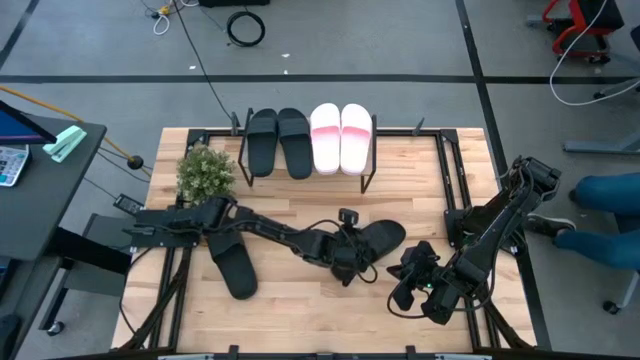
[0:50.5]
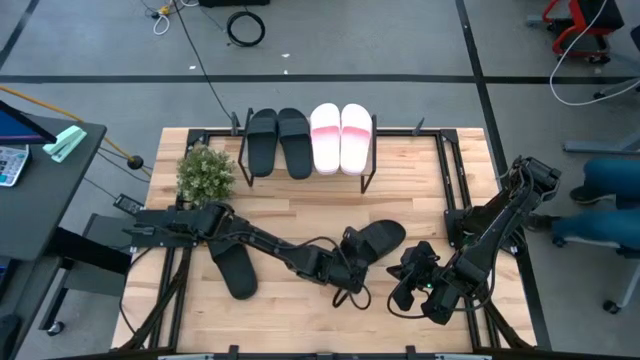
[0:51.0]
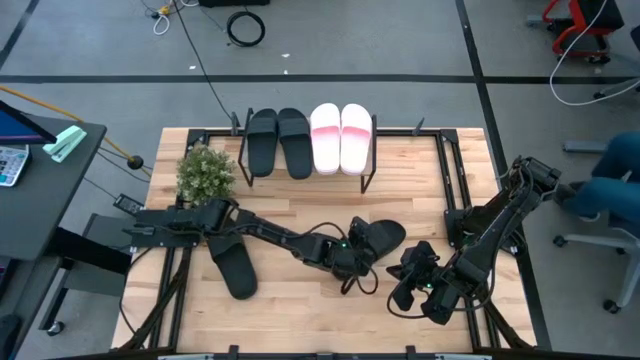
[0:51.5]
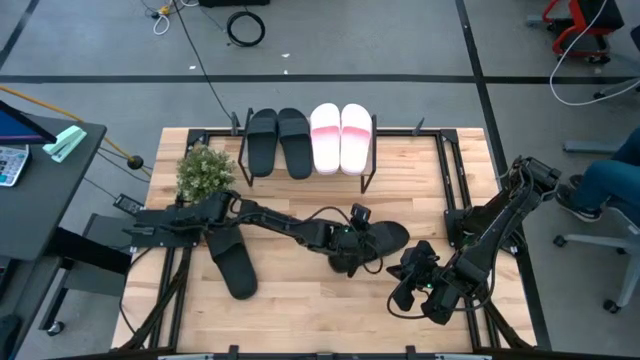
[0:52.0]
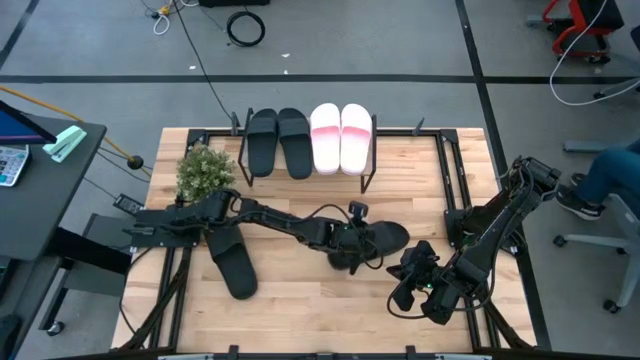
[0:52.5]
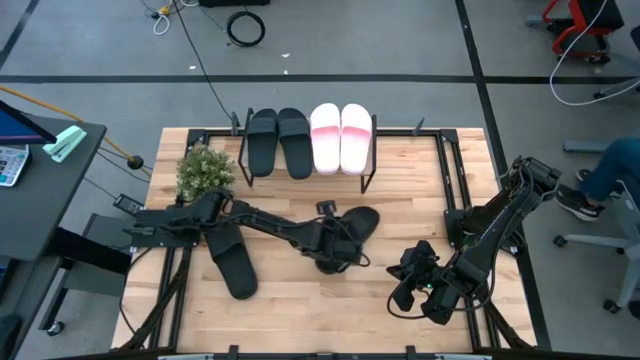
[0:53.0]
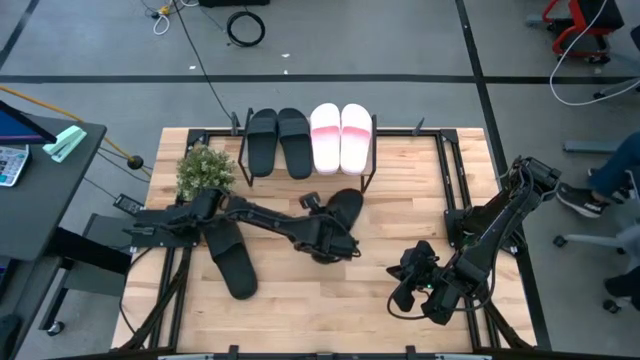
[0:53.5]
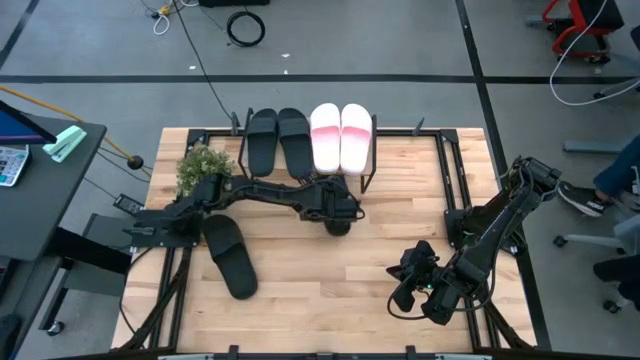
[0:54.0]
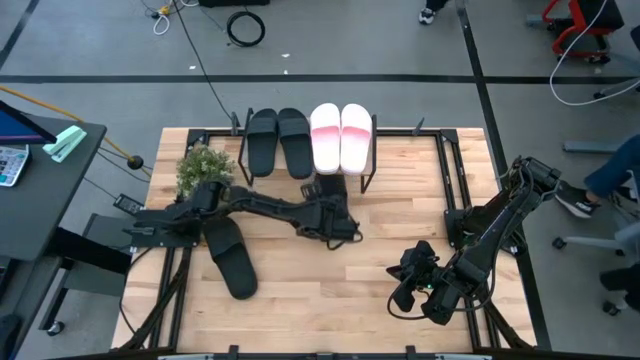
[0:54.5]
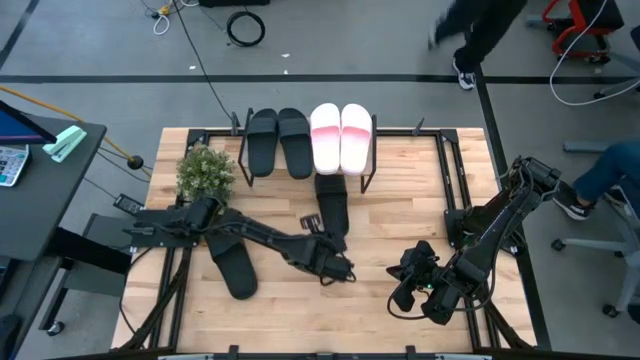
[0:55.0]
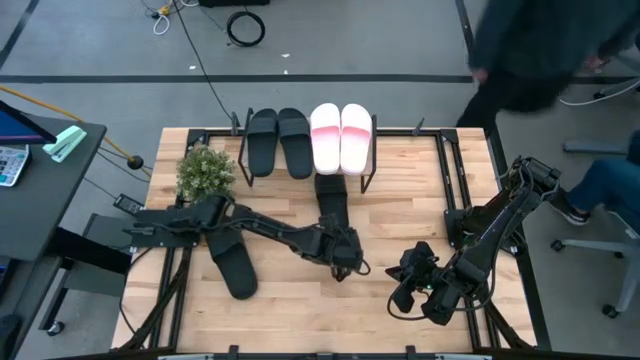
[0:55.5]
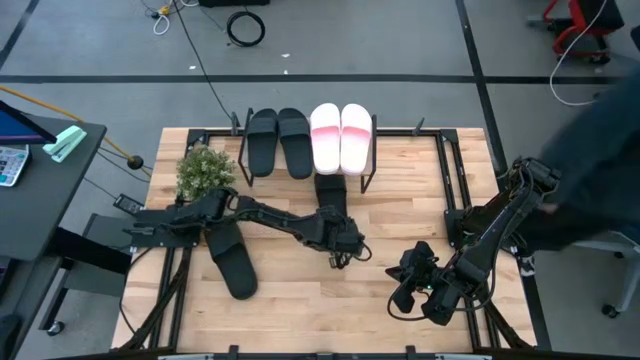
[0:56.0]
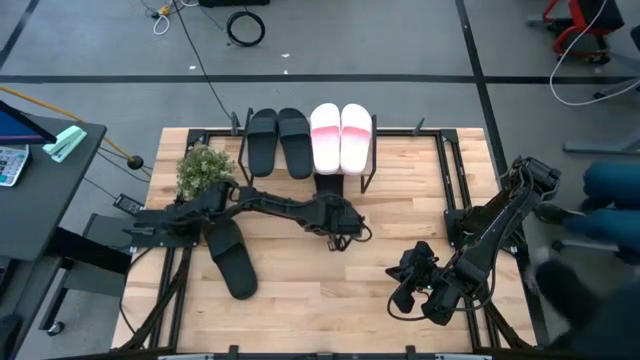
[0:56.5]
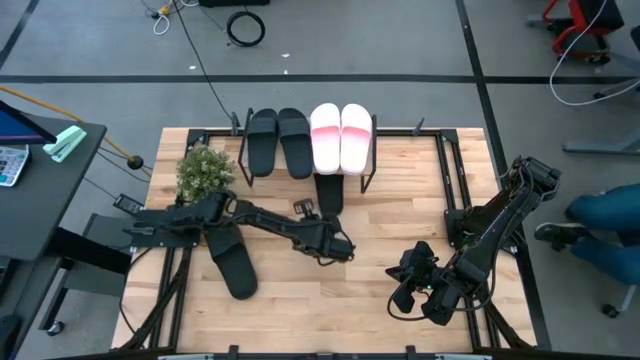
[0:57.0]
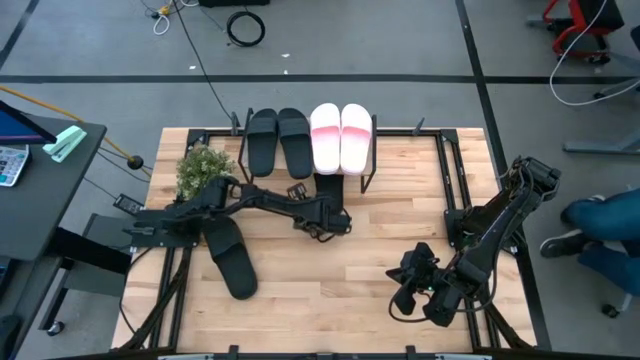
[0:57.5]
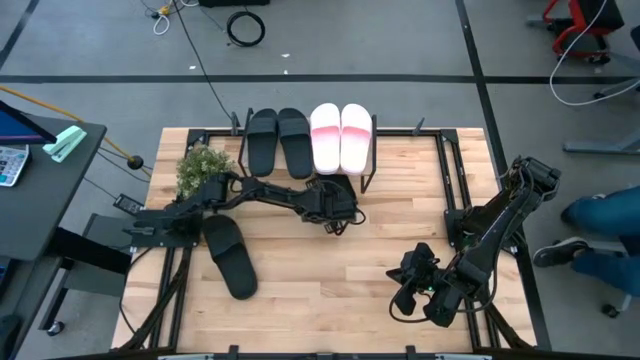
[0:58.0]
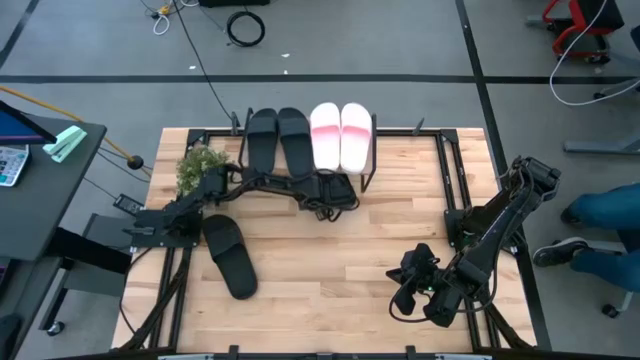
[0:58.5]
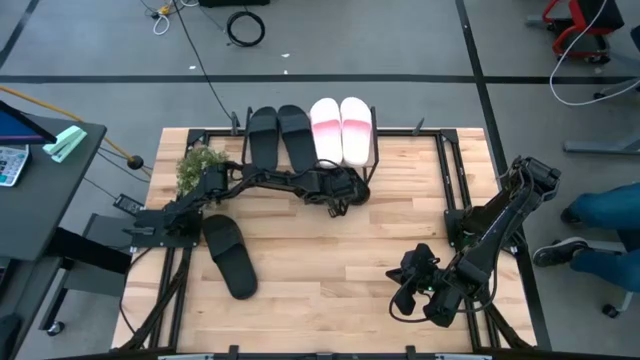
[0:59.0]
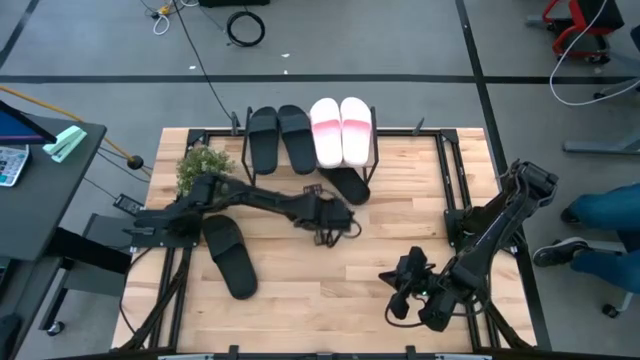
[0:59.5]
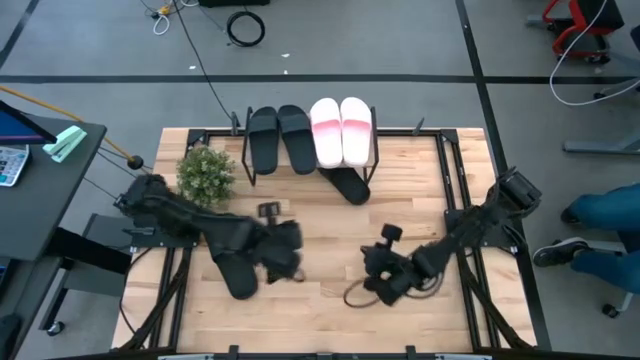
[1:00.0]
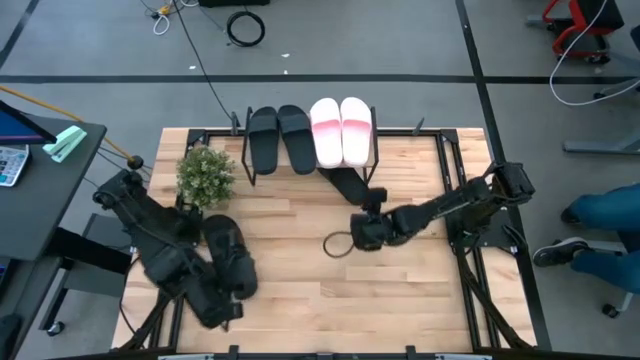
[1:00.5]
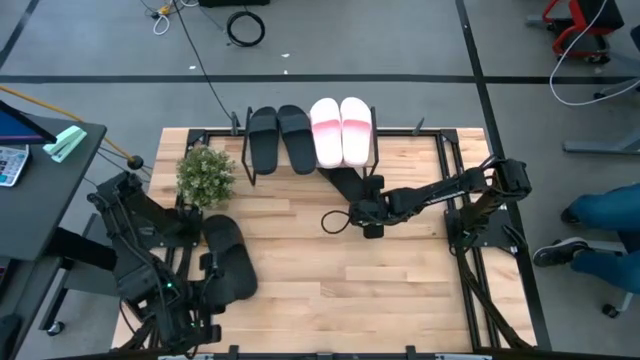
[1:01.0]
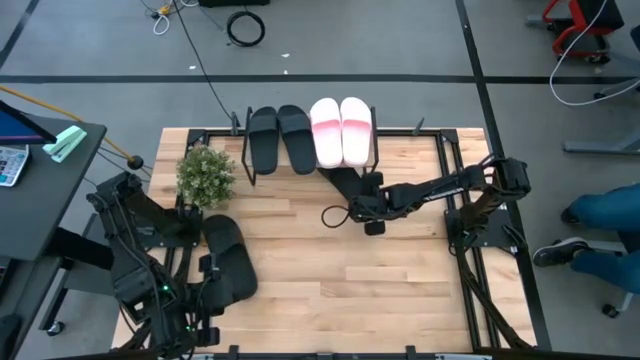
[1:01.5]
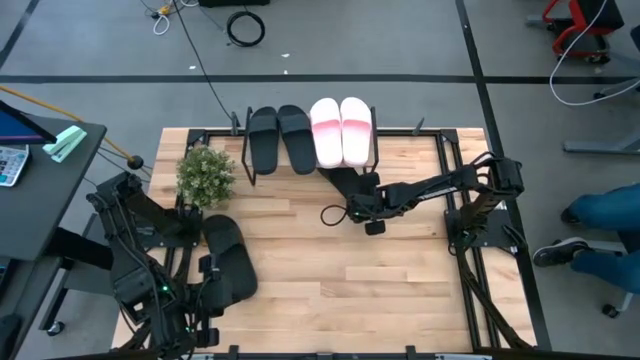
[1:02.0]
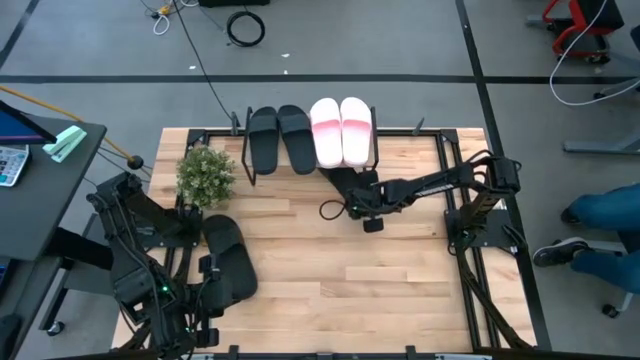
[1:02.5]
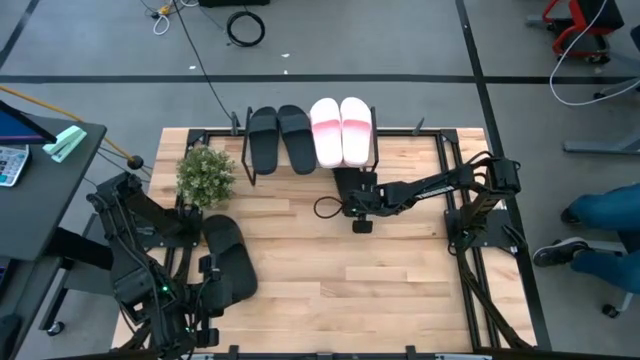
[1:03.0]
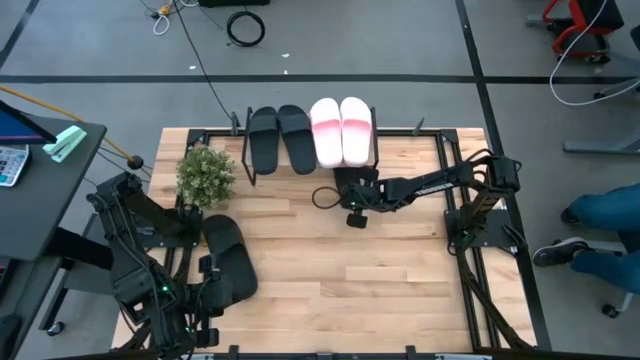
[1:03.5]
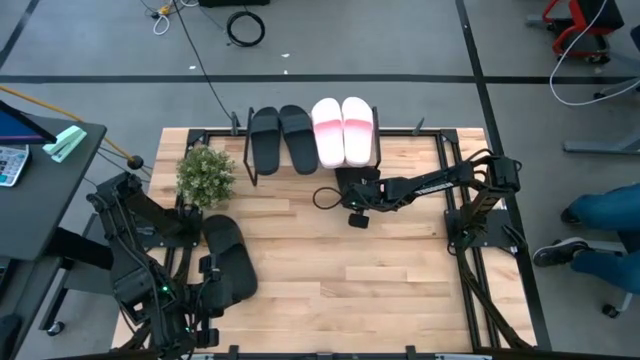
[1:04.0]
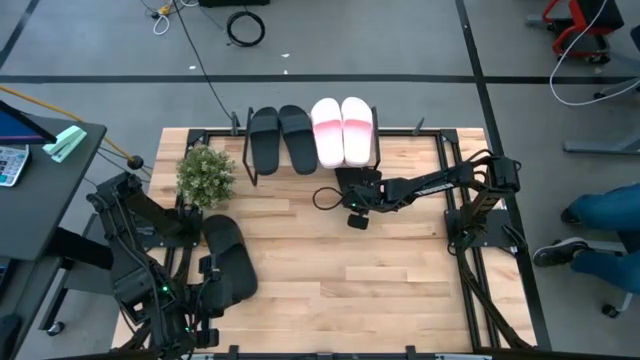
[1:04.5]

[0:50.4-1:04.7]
Task: Pick and place slides into the shelf
Put the right black slide under the shelf

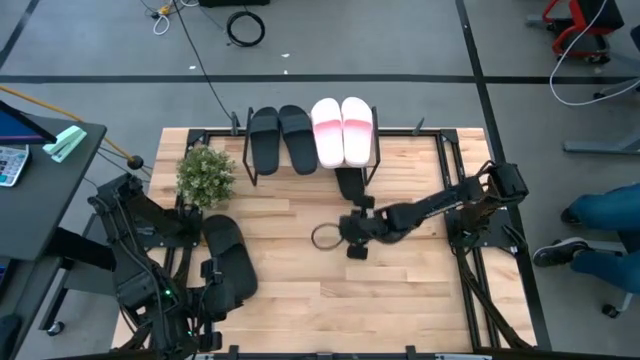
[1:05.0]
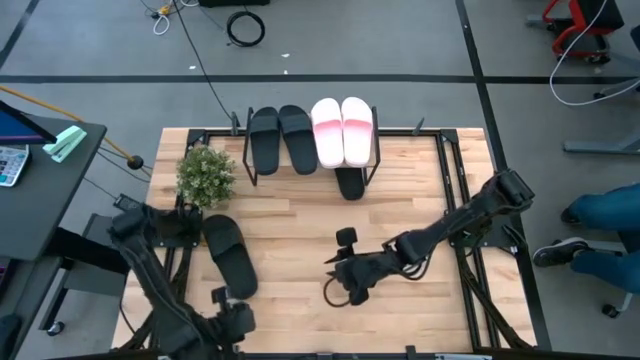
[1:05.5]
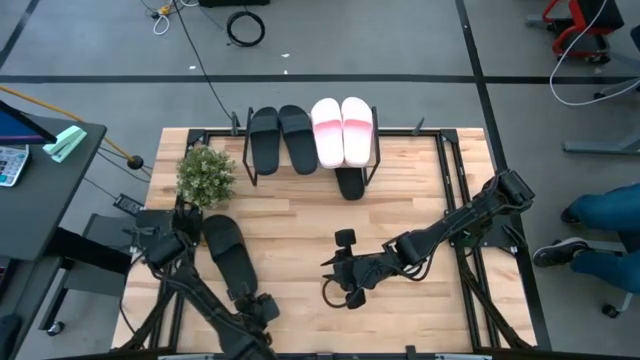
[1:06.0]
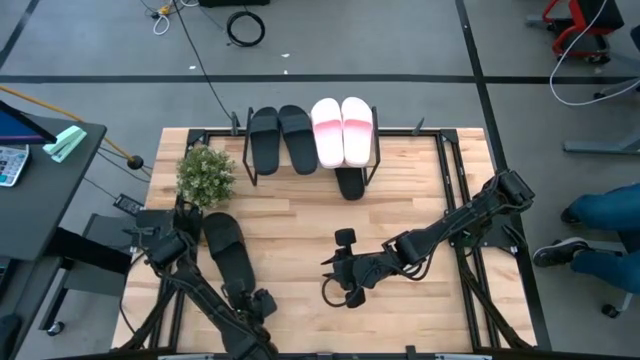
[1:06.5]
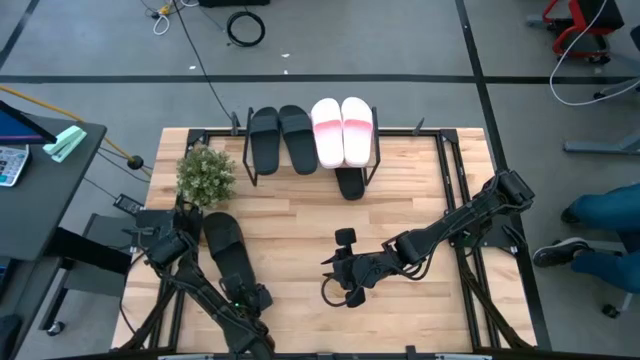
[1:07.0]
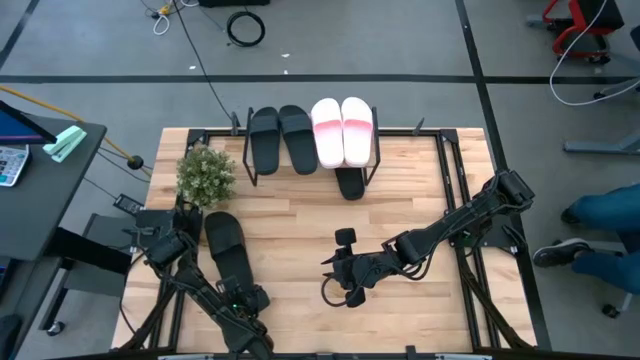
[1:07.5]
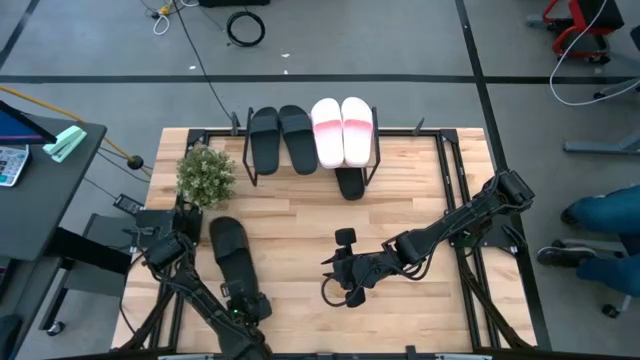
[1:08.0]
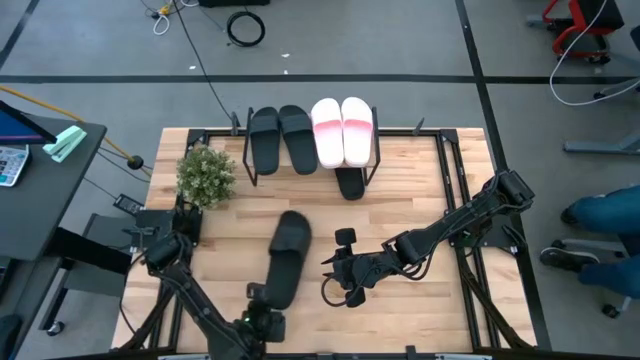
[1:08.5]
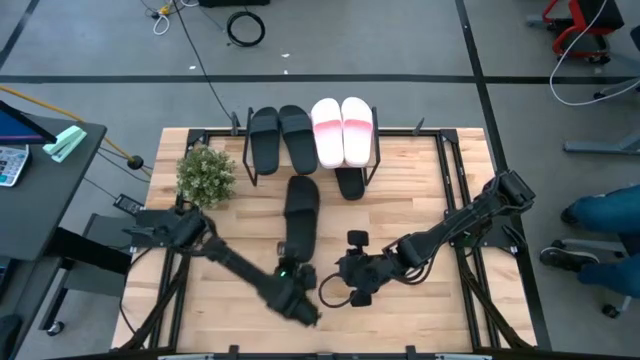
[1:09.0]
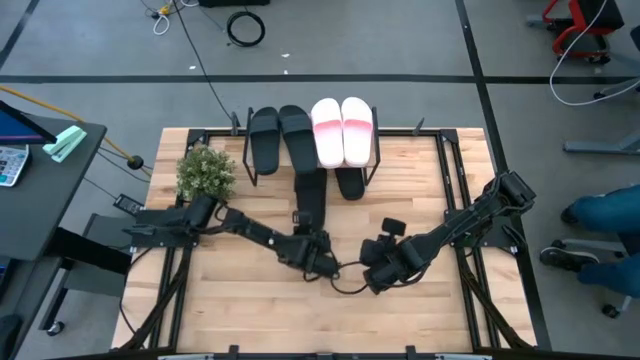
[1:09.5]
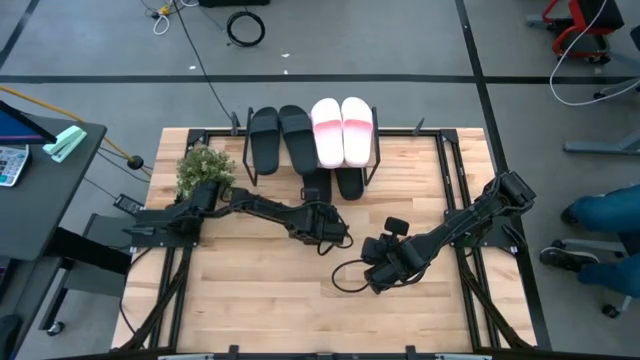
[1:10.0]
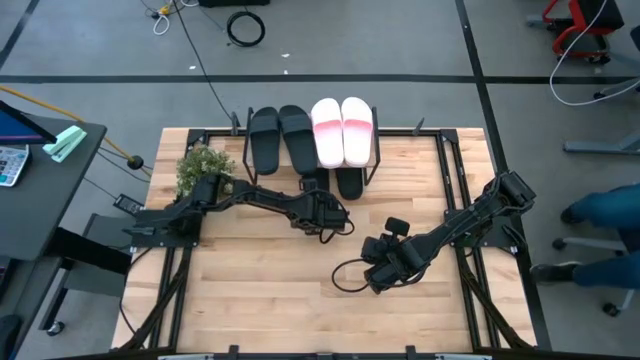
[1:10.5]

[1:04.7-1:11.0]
Put the black slide under the shelf

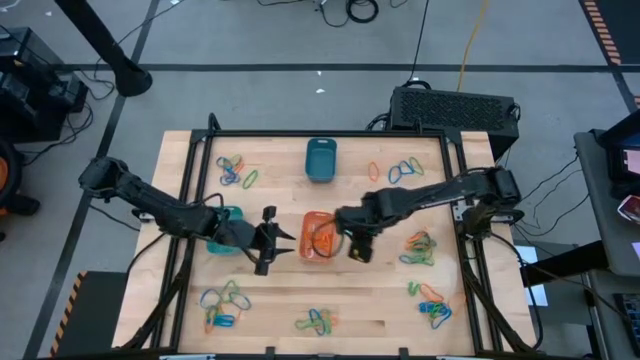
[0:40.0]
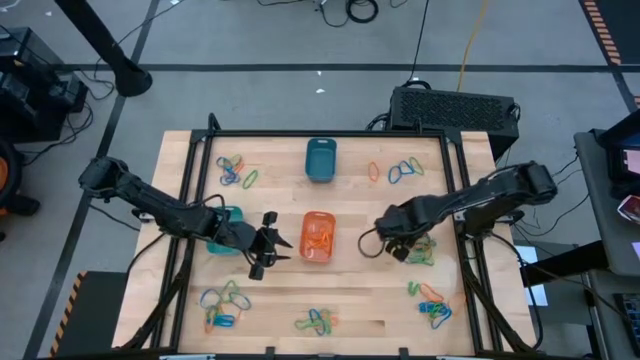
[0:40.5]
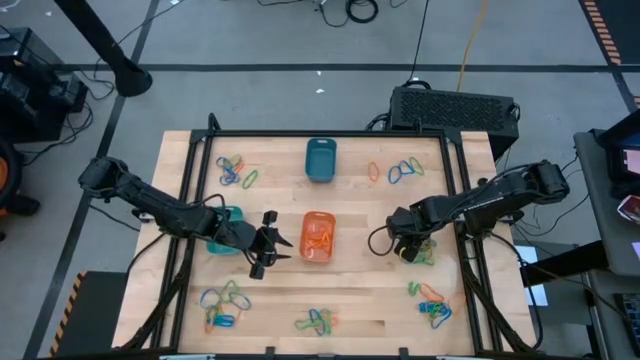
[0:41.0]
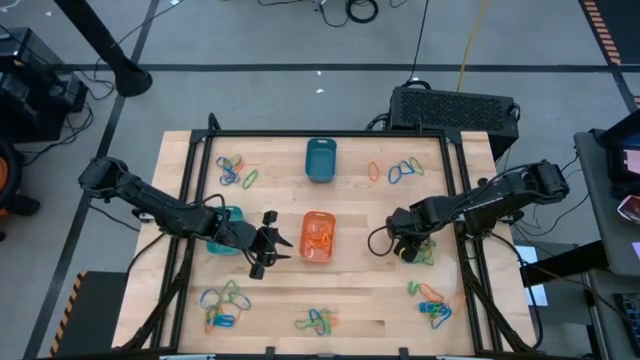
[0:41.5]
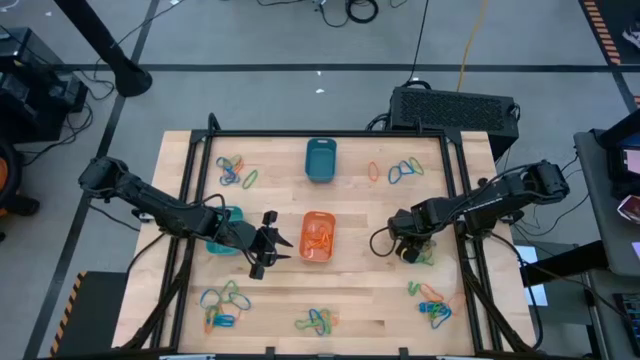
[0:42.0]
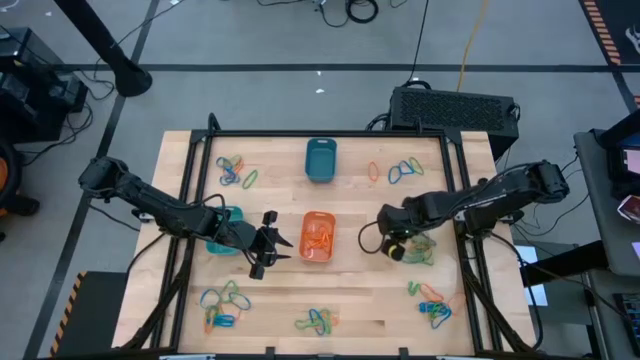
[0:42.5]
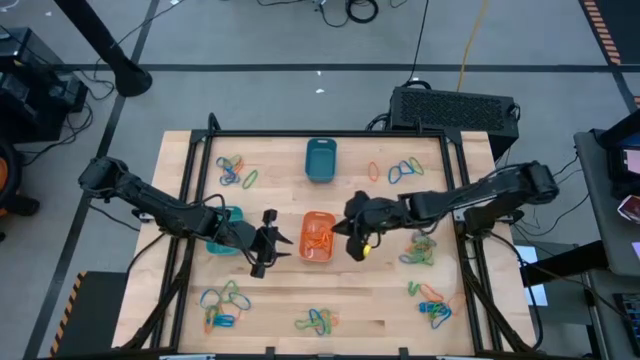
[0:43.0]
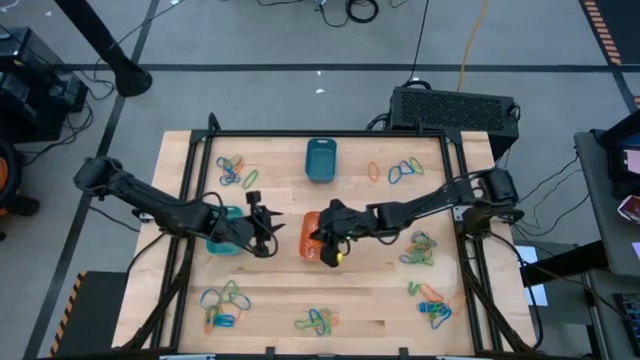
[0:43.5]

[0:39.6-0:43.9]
Task: Sort rubber bands into baskets
Put the orange rubber band into the orange bin
